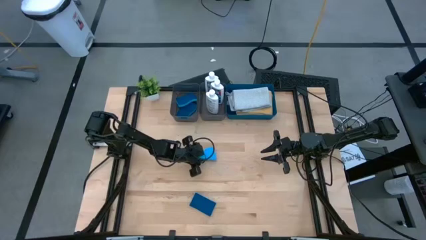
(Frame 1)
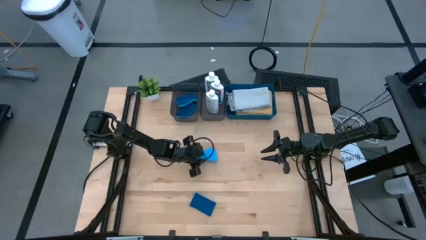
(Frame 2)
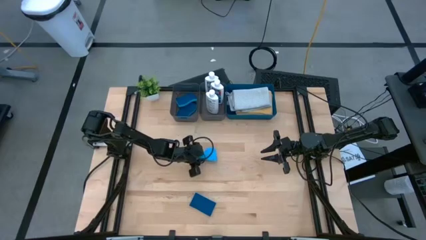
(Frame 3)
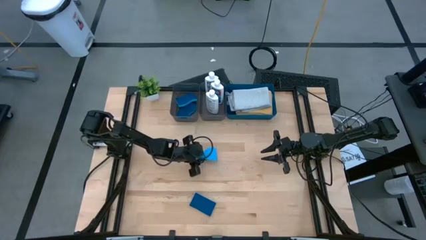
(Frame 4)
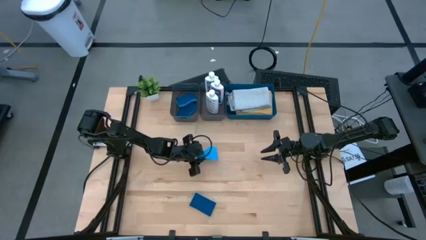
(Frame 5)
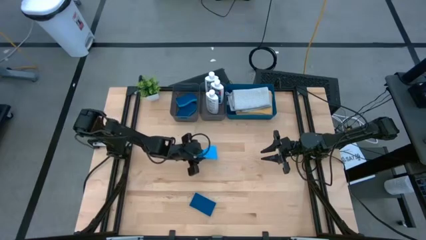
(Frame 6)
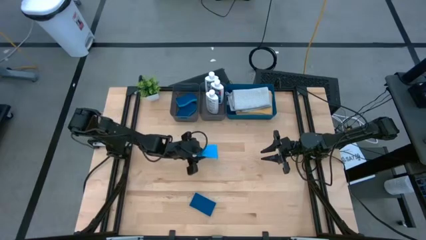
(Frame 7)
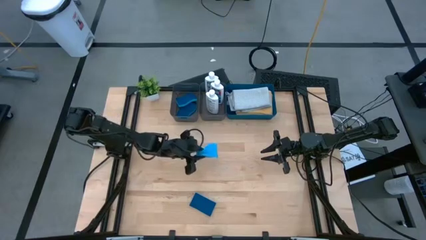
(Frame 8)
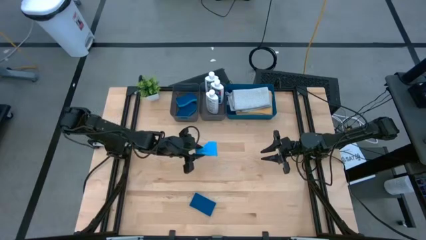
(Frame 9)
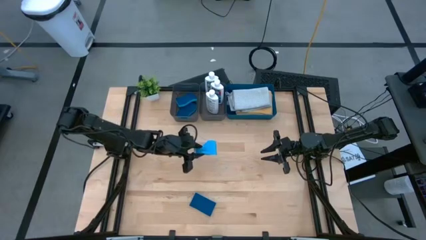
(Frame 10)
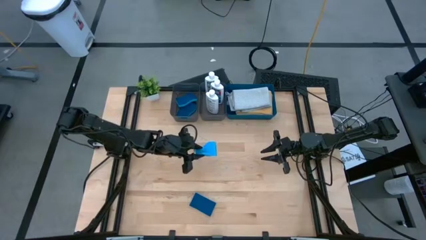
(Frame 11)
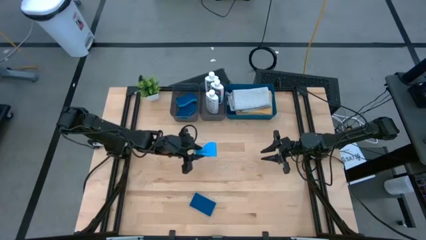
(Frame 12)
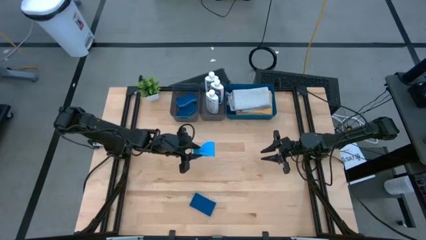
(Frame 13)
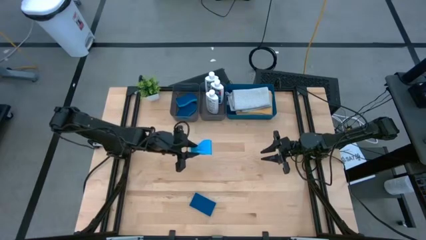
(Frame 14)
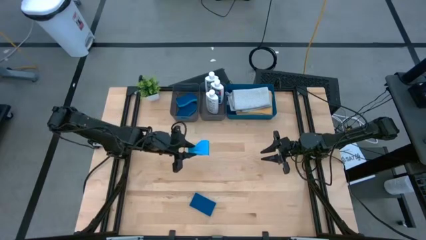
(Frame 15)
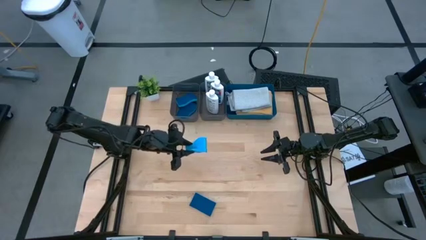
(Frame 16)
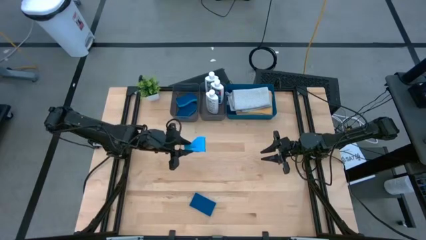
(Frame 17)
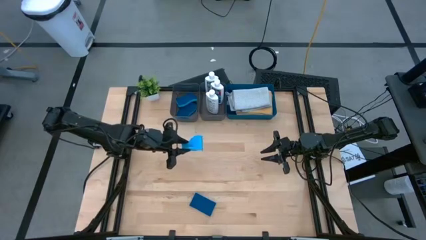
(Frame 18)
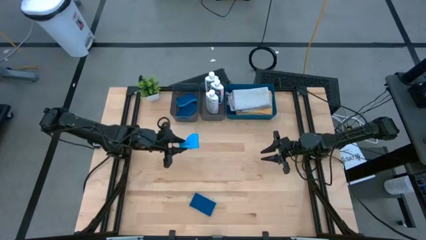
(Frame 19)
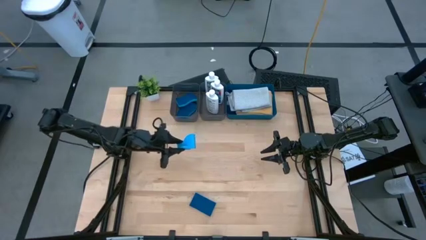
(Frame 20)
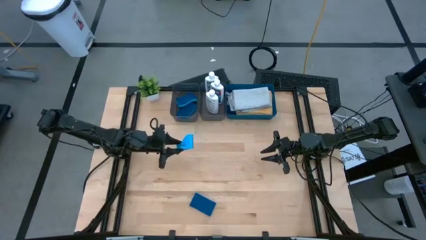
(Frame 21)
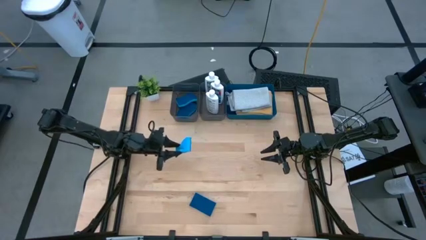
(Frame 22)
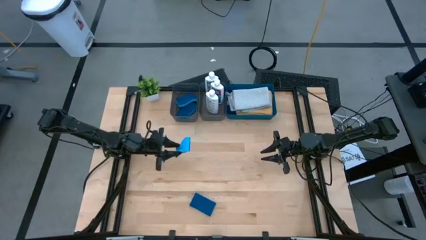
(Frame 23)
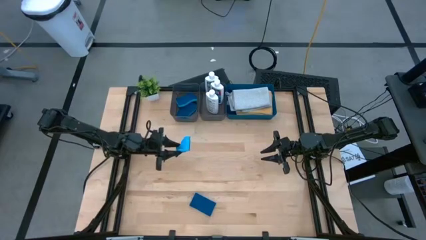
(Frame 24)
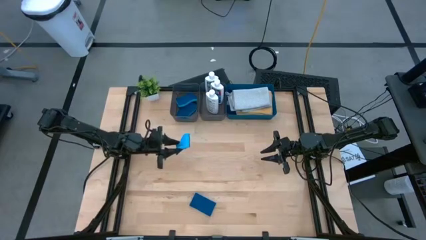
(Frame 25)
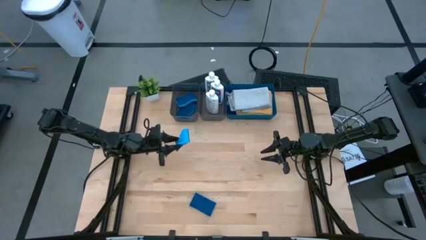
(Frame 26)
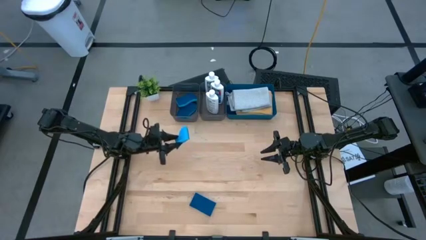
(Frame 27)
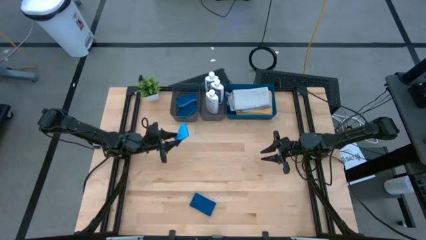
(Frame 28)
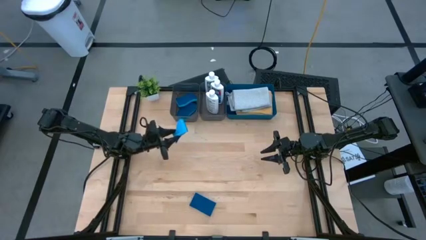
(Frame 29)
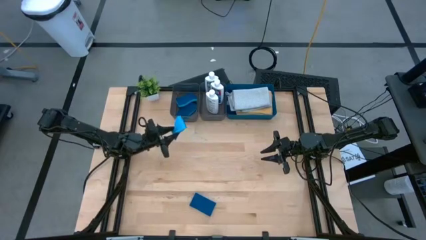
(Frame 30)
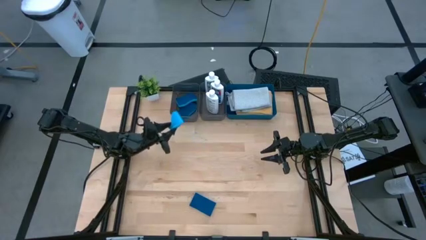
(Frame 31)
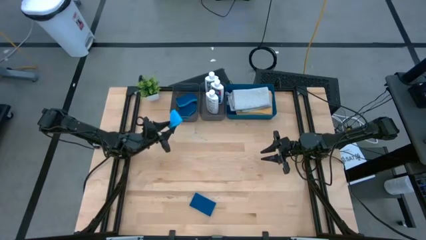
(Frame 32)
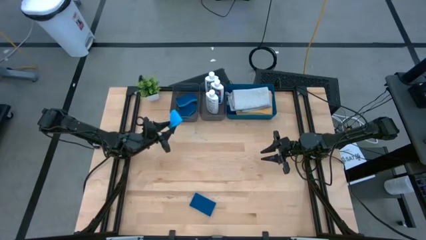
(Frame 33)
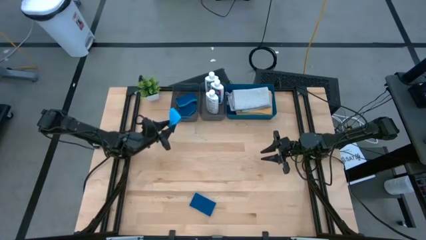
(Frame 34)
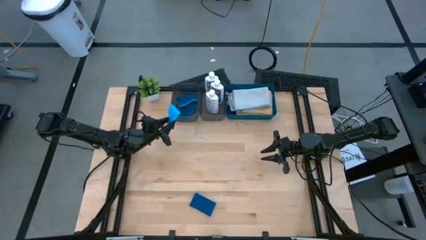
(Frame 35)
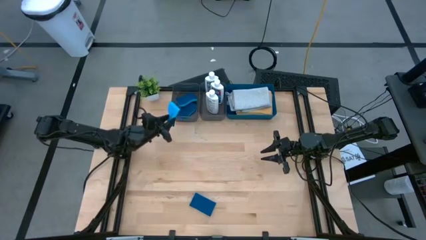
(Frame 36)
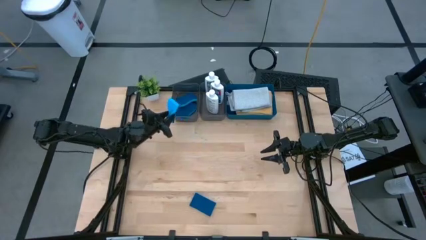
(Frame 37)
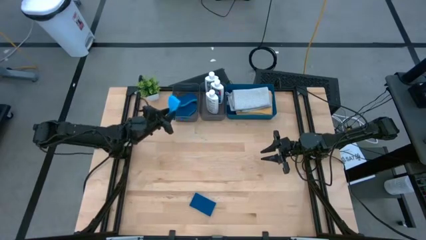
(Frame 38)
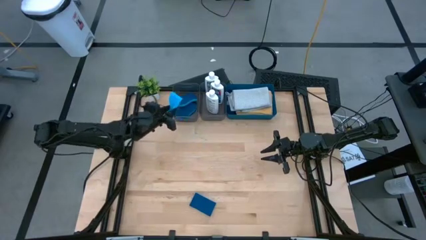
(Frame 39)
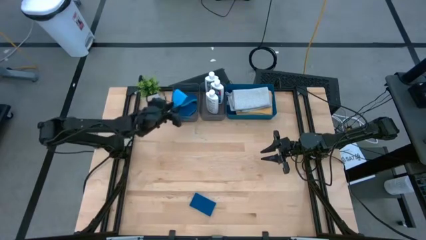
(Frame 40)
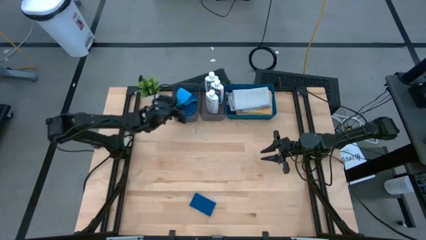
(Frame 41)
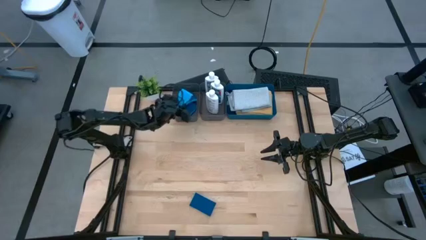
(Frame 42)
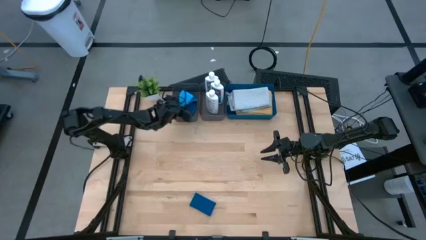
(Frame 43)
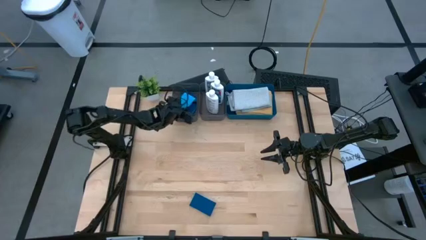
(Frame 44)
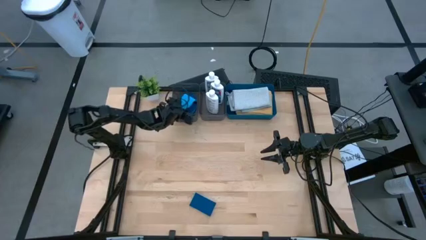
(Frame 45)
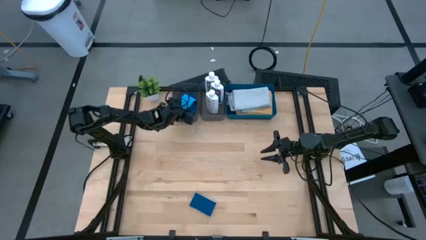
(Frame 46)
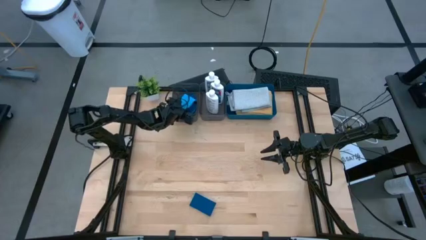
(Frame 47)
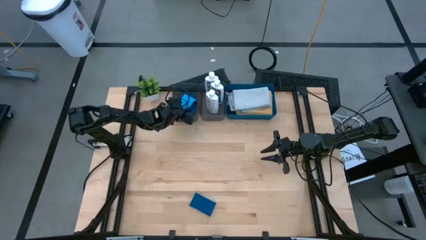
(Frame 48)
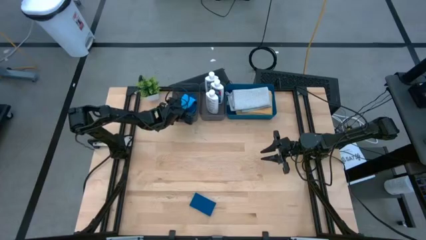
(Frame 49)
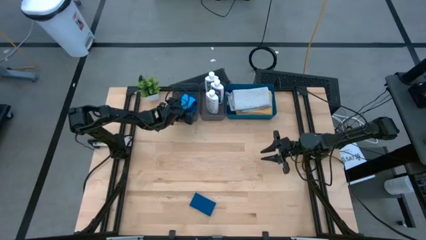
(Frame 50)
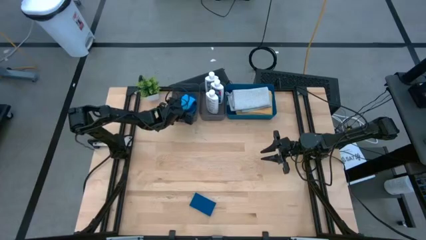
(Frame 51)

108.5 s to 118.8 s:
Task: Pick & Place Kitchen Items
Put the light blue sponge into the left black bin
